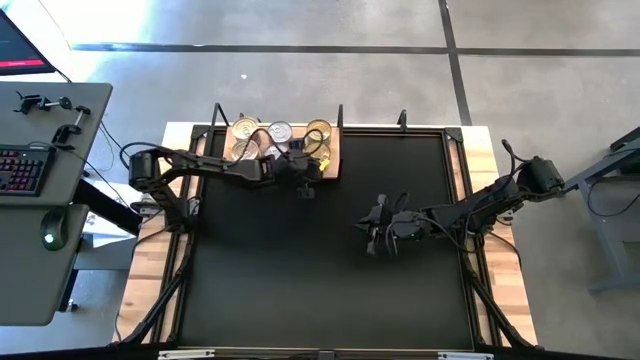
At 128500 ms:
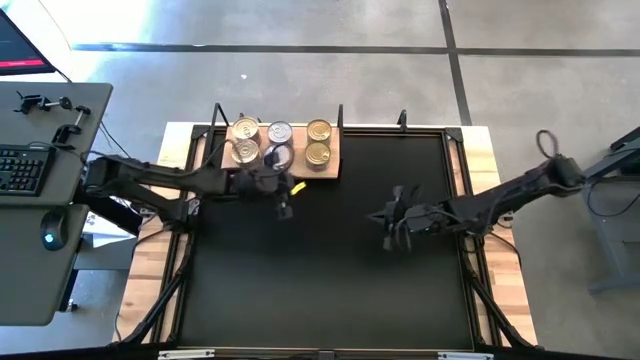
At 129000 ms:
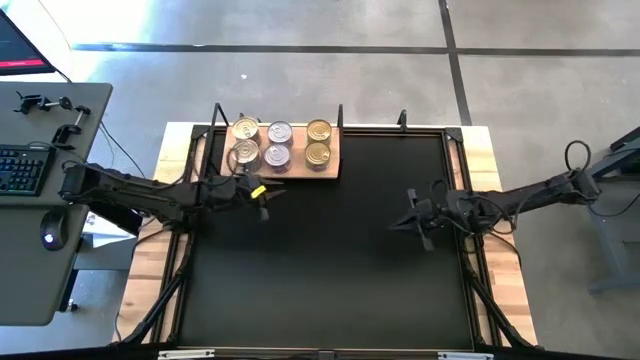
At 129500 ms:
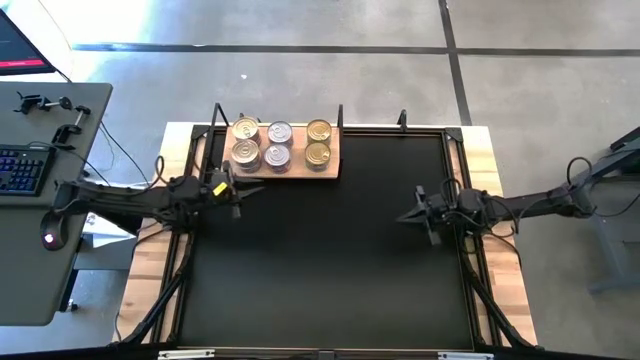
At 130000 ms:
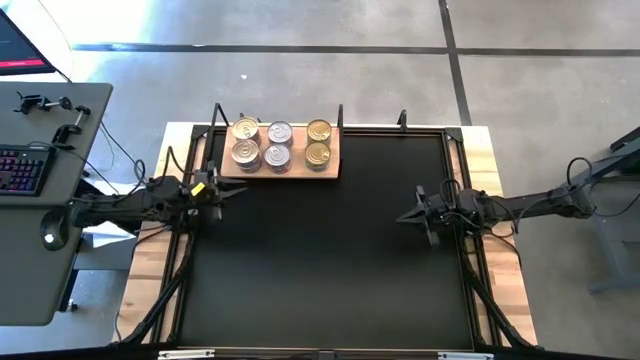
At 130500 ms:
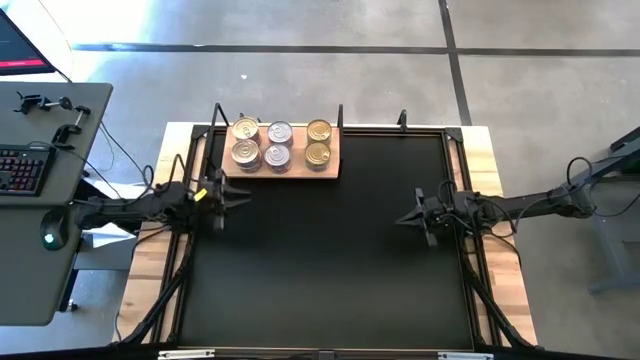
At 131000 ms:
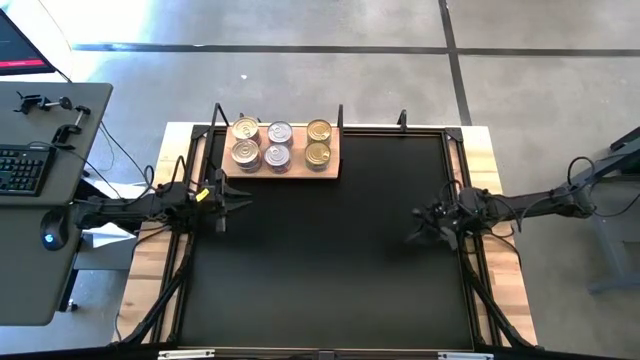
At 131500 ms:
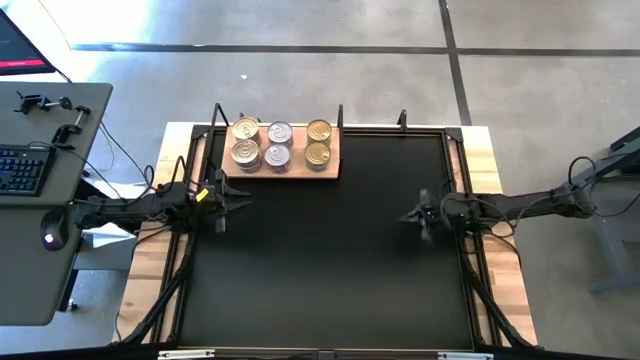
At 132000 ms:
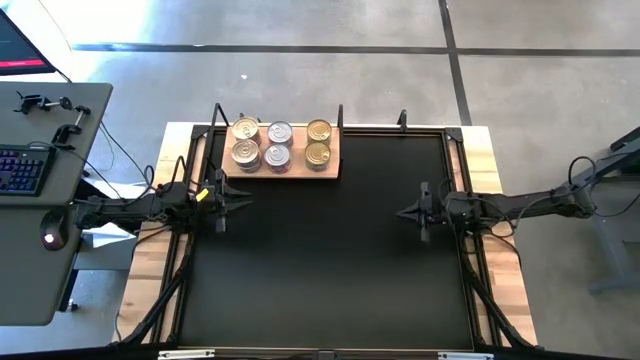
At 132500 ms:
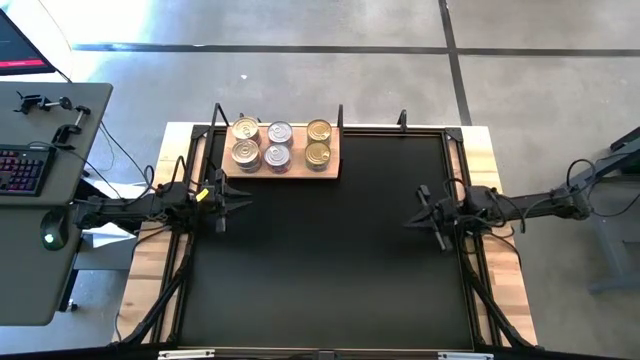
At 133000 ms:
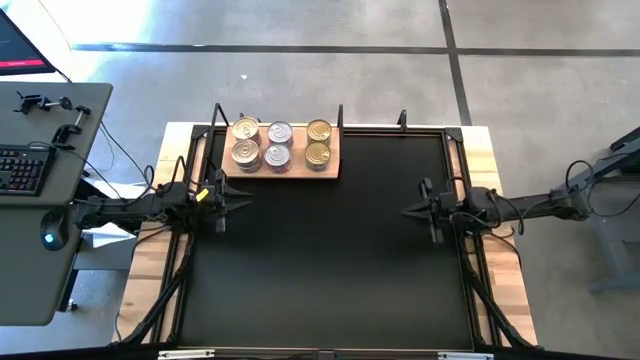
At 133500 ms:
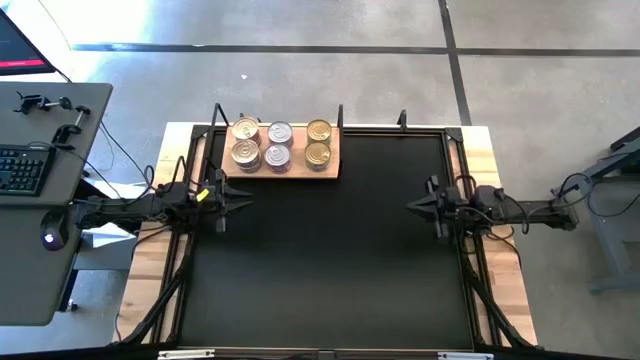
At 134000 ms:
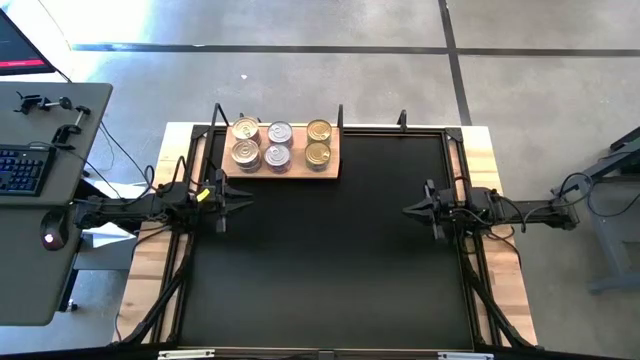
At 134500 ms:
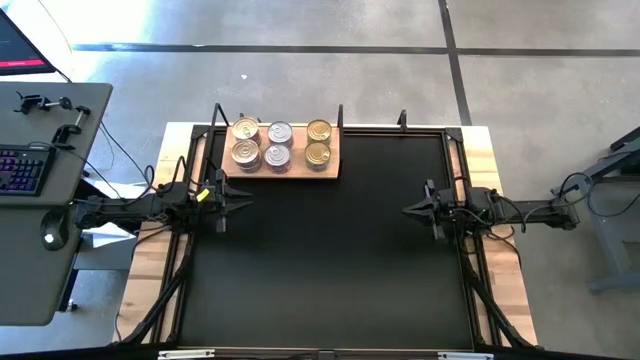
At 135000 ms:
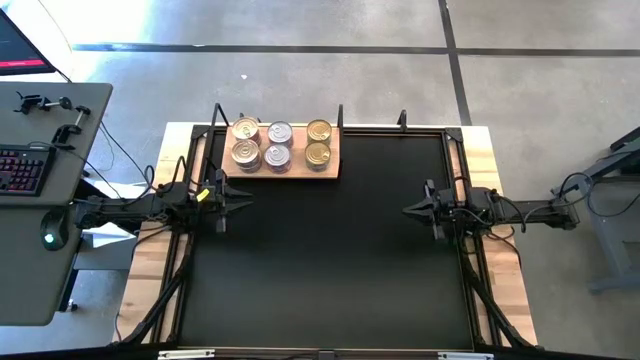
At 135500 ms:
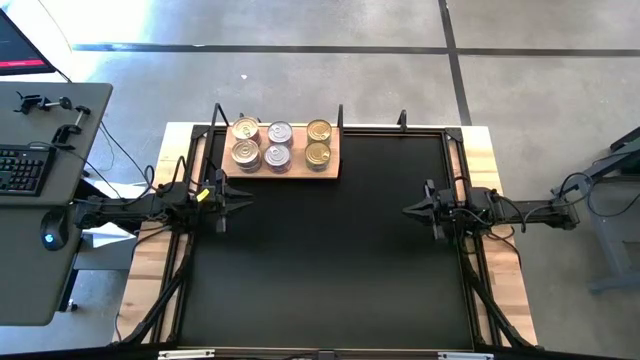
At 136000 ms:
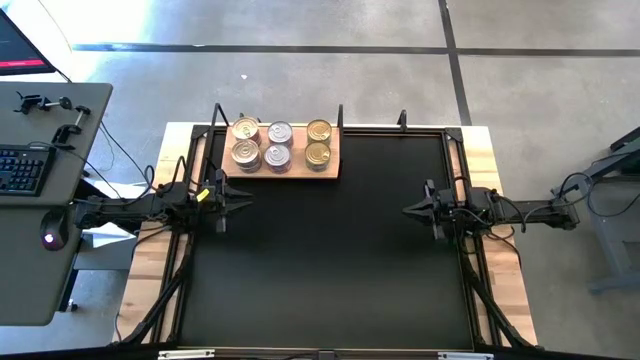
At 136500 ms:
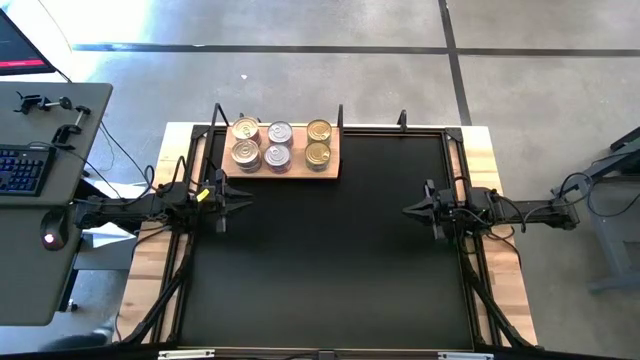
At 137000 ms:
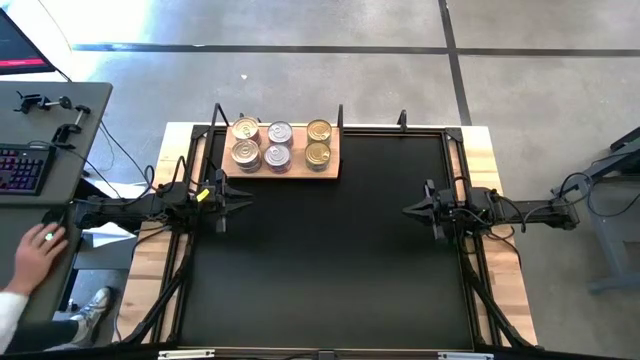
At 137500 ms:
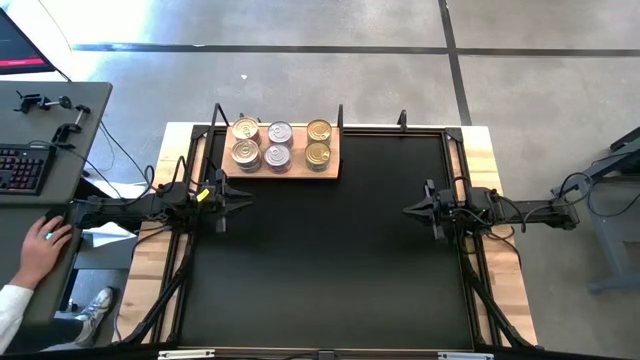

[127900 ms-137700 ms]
Task: Stack canned seafood by type on shelf
Return to Home Position

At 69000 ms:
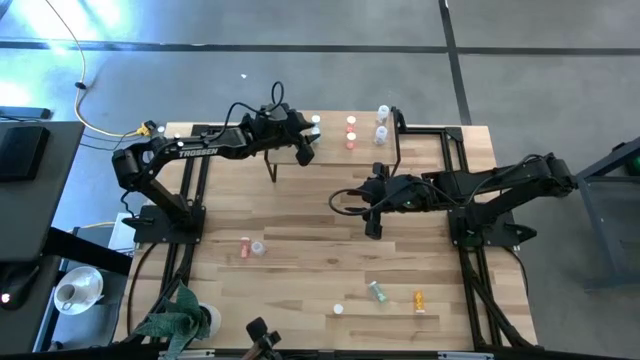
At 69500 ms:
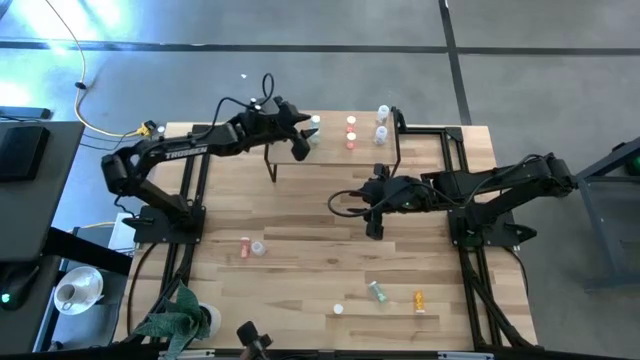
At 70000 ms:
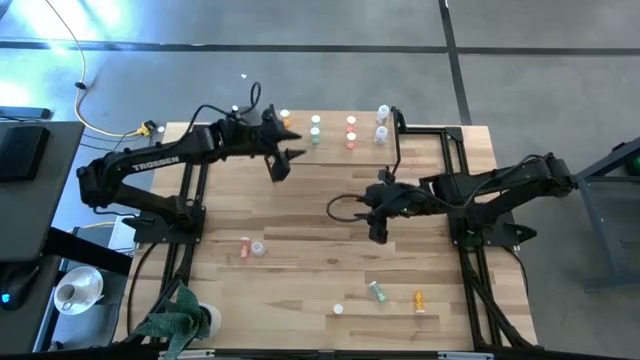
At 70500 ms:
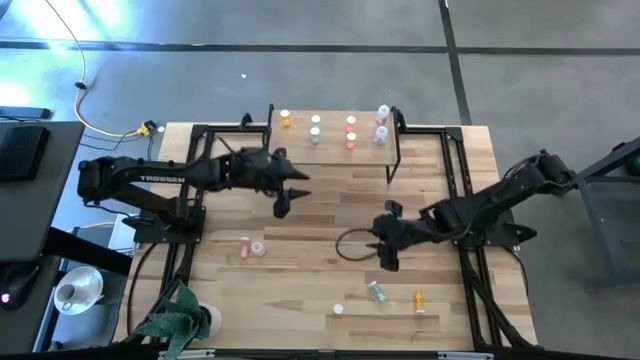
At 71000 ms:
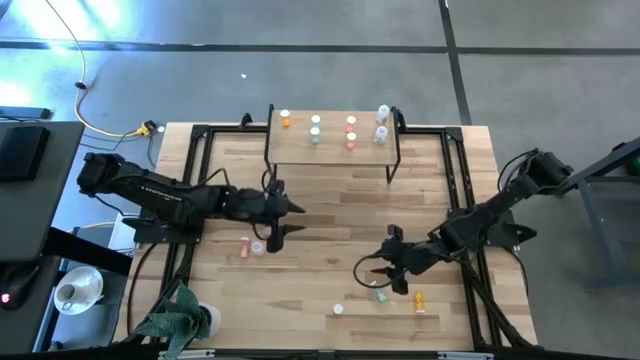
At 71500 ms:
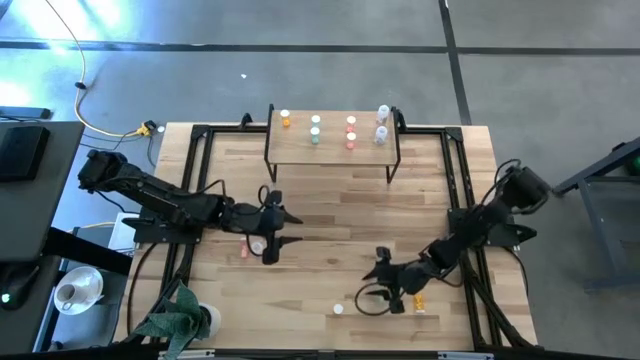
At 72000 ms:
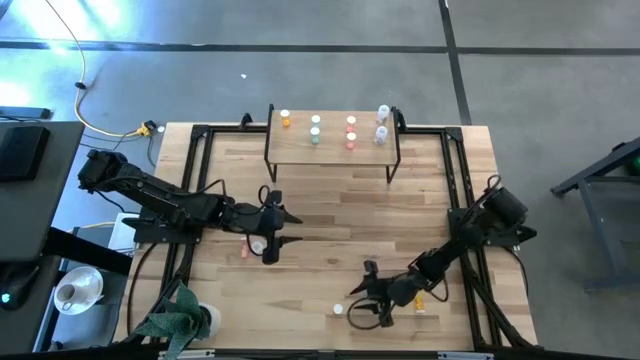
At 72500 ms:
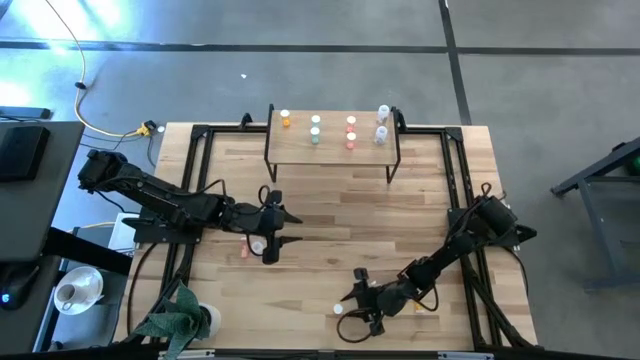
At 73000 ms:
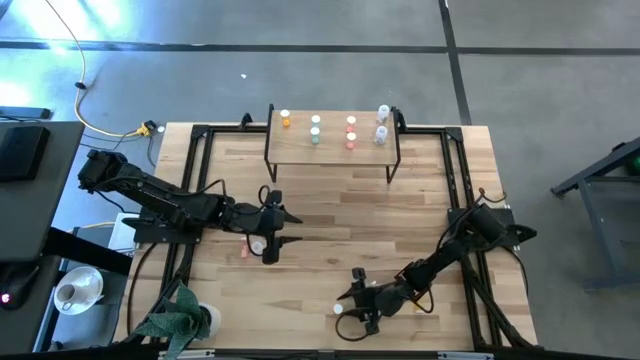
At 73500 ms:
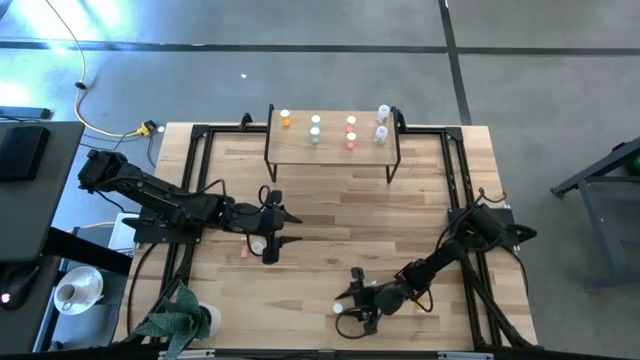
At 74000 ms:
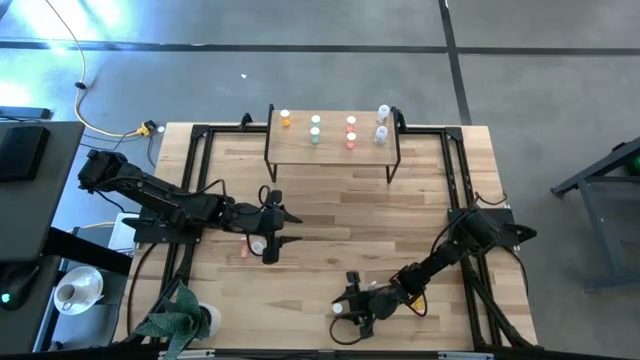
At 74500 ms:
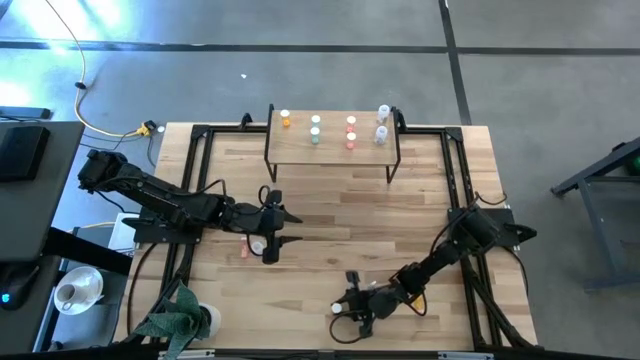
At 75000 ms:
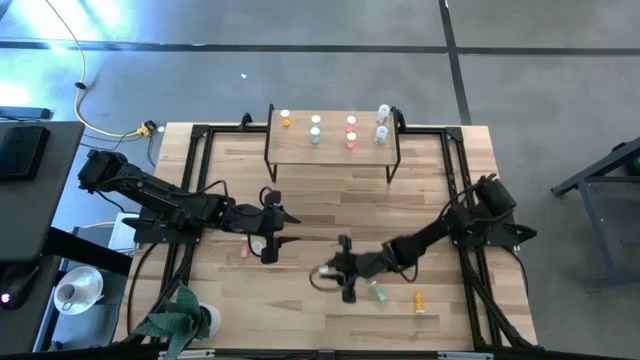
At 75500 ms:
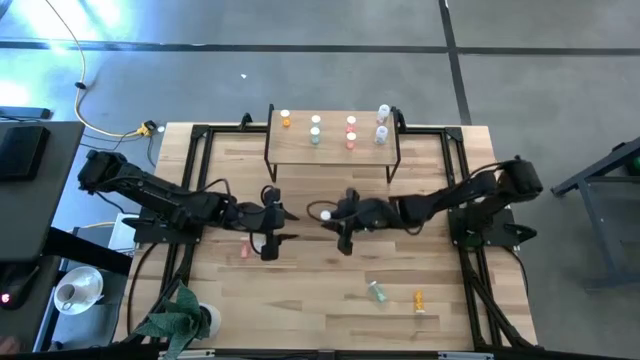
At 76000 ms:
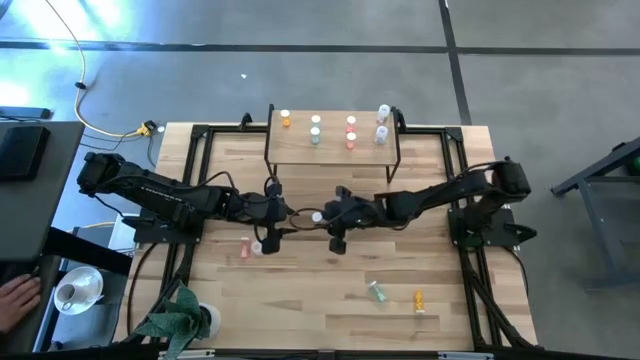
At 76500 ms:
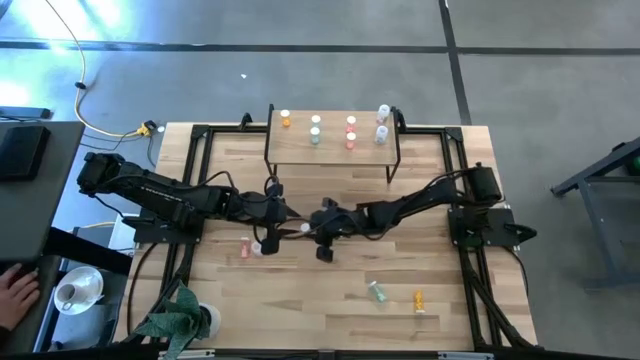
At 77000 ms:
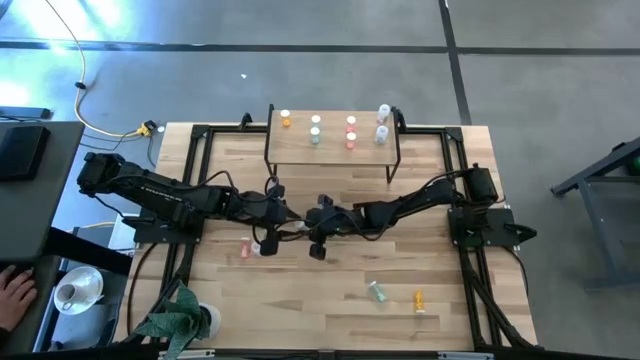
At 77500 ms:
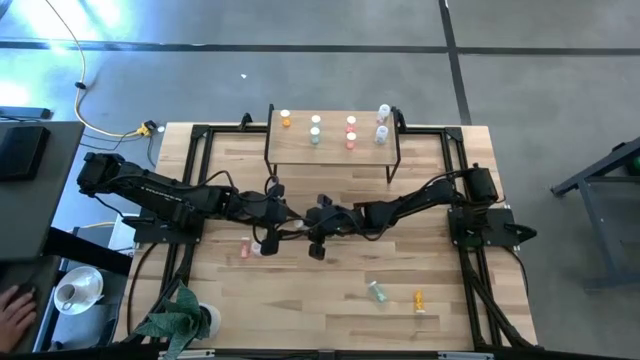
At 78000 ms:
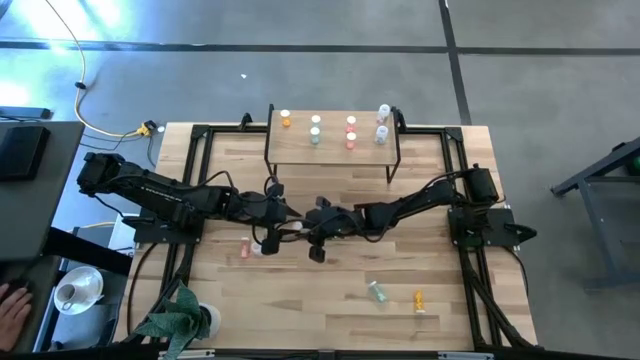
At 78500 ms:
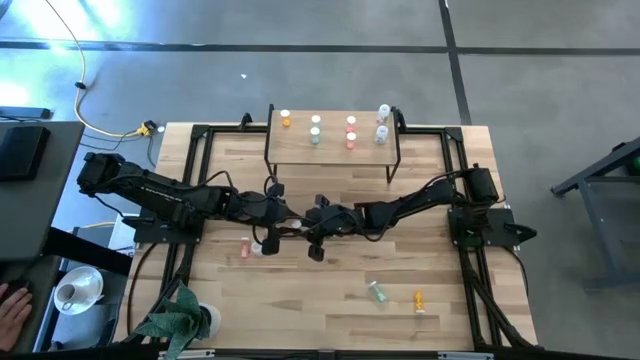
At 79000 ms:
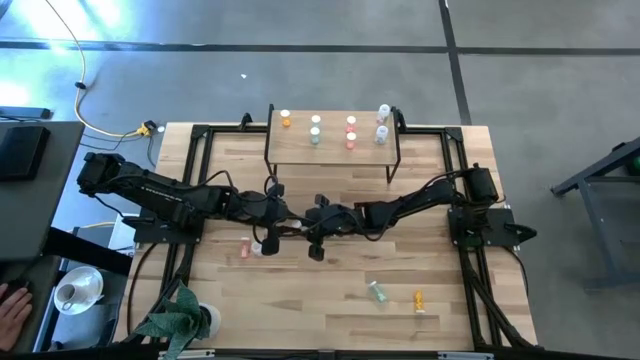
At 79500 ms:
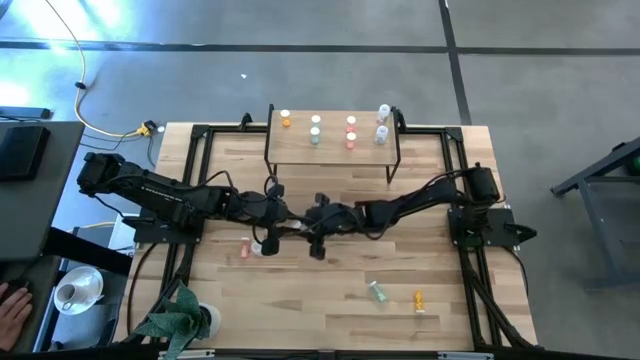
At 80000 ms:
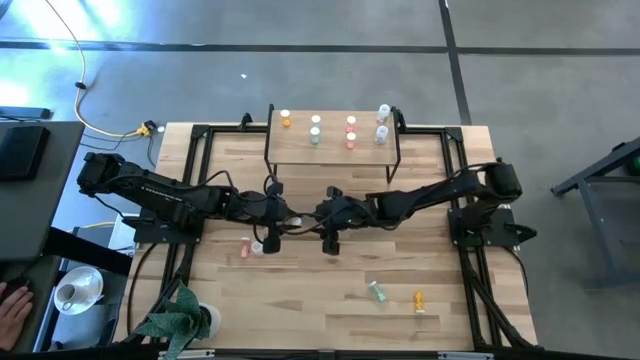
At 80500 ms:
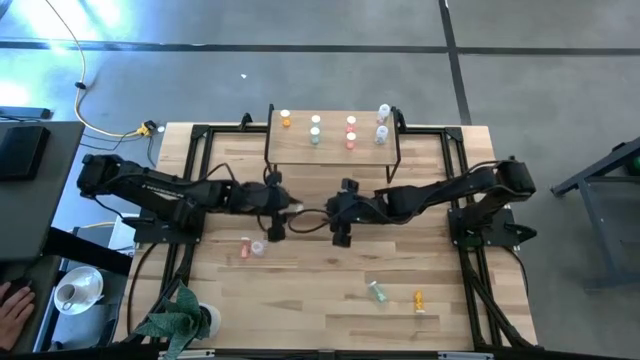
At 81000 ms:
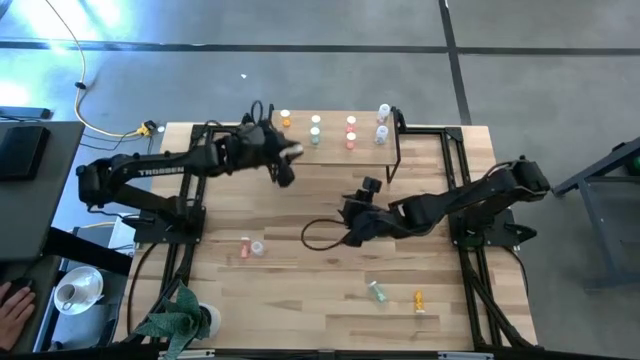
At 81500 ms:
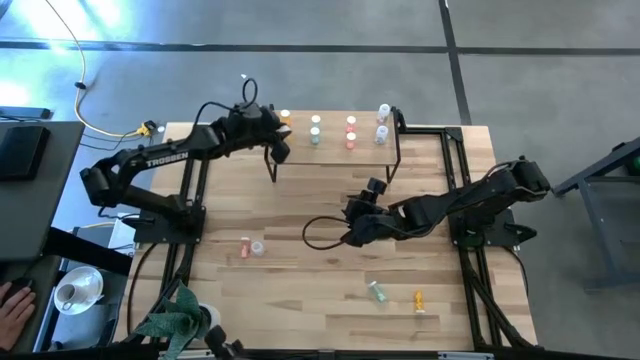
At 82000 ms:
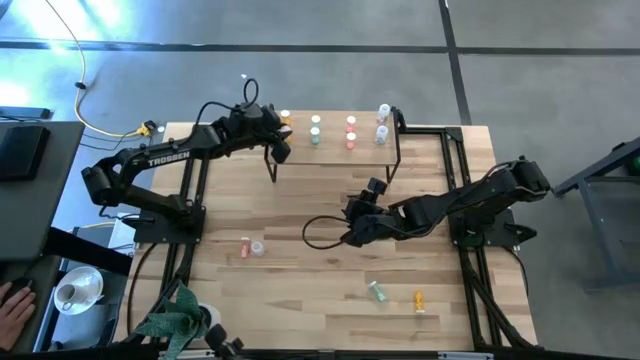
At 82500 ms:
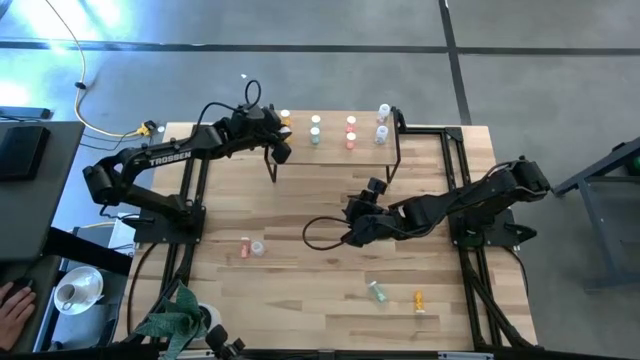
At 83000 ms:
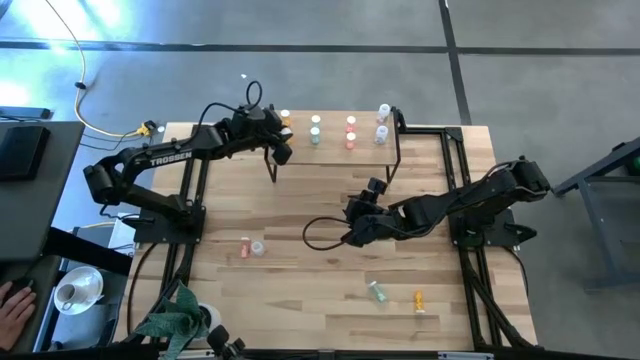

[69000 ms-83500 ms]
Task: Pick and place medicine bottles onto shelf by color
Put the left orange pill bottle on the shelf
